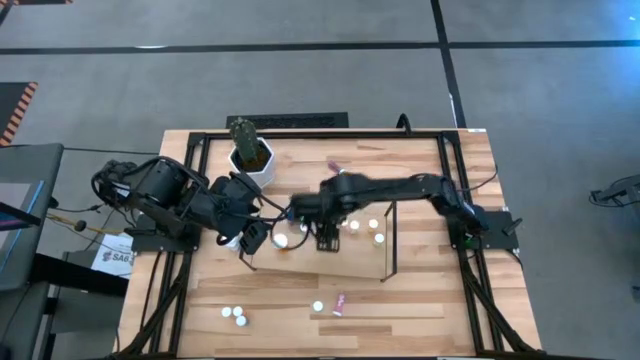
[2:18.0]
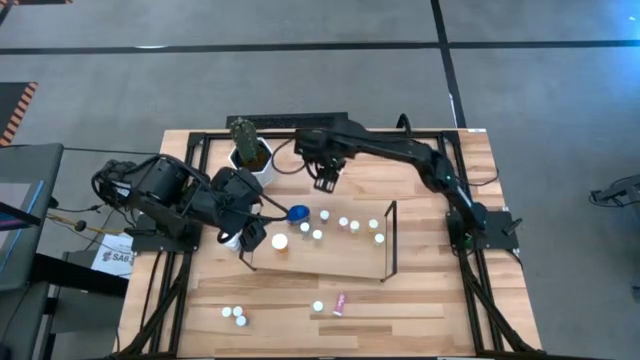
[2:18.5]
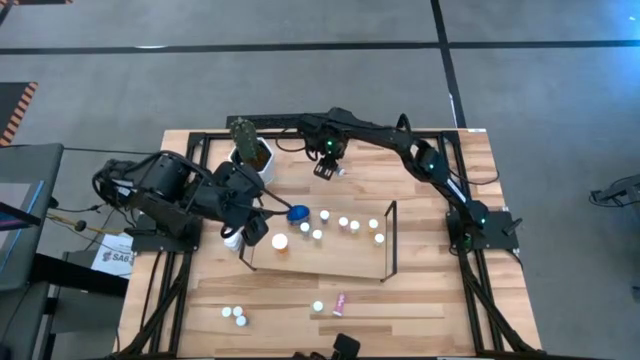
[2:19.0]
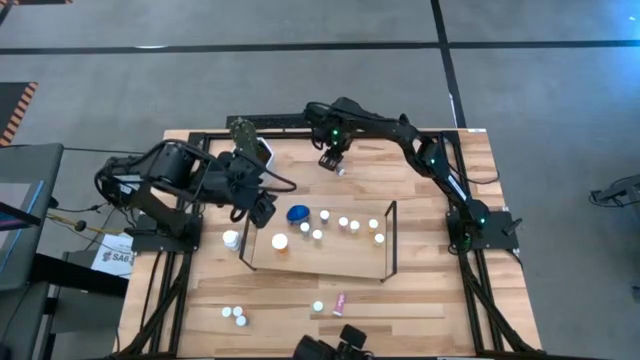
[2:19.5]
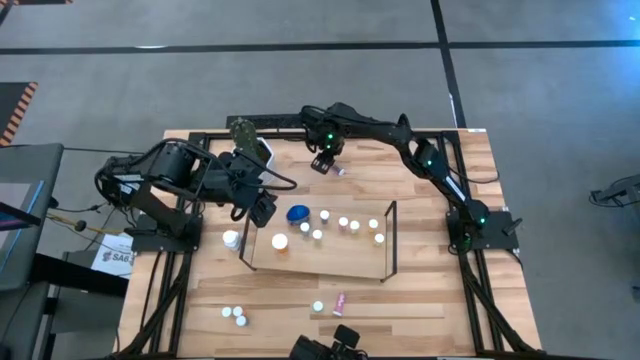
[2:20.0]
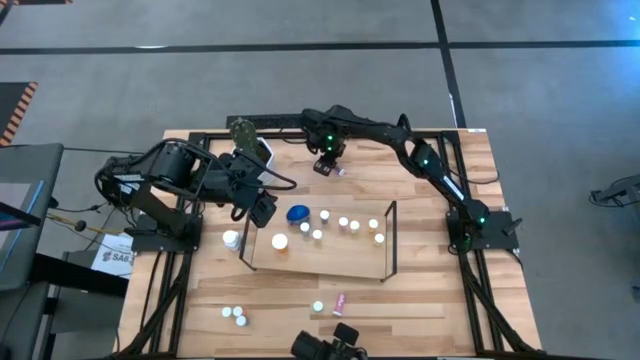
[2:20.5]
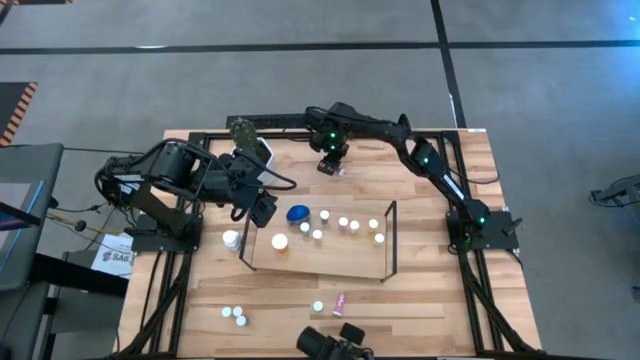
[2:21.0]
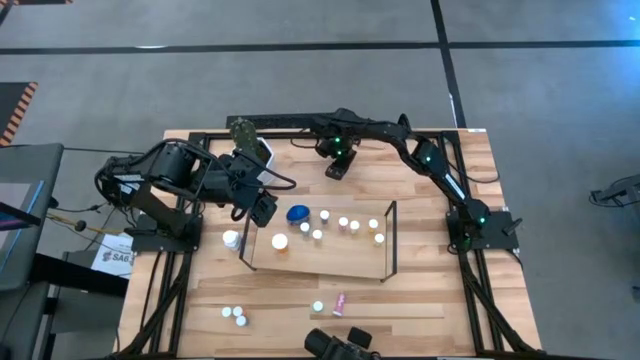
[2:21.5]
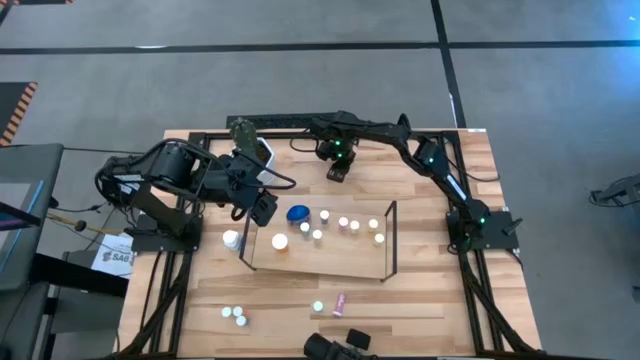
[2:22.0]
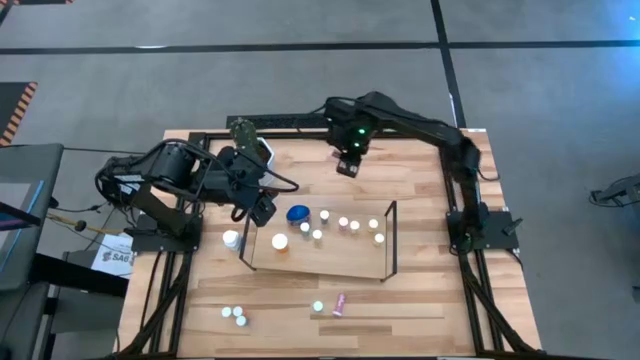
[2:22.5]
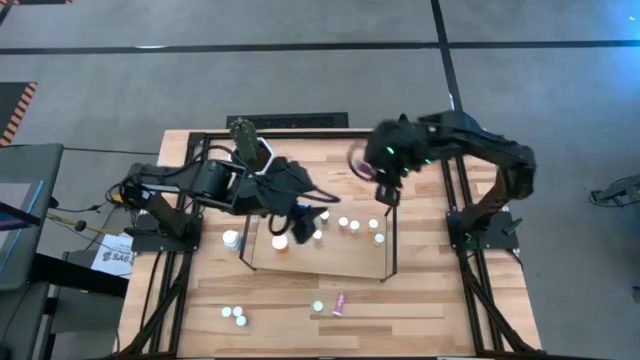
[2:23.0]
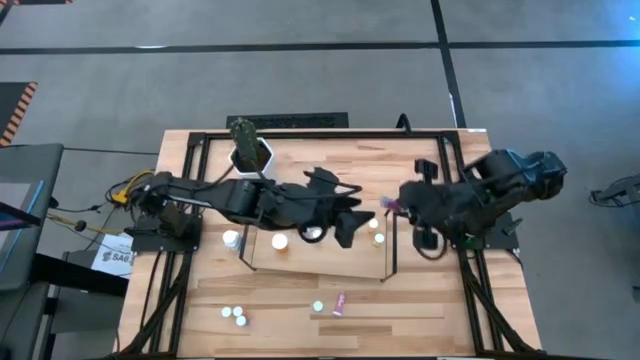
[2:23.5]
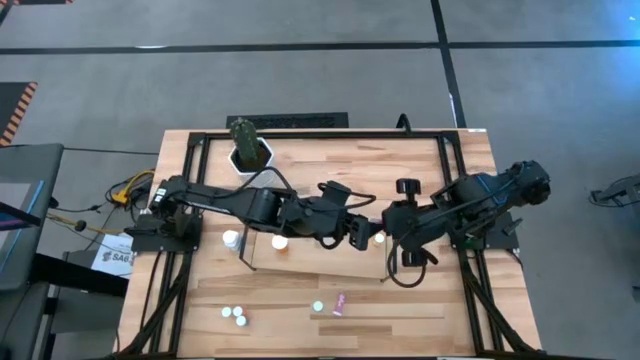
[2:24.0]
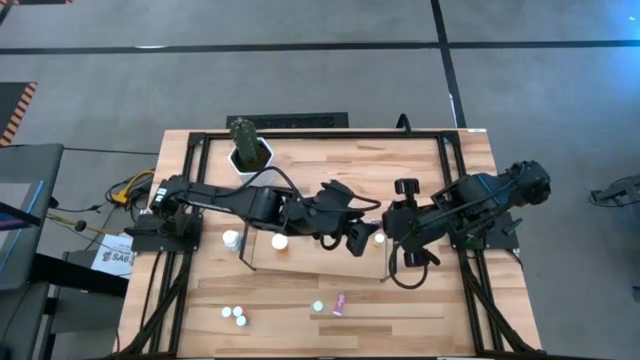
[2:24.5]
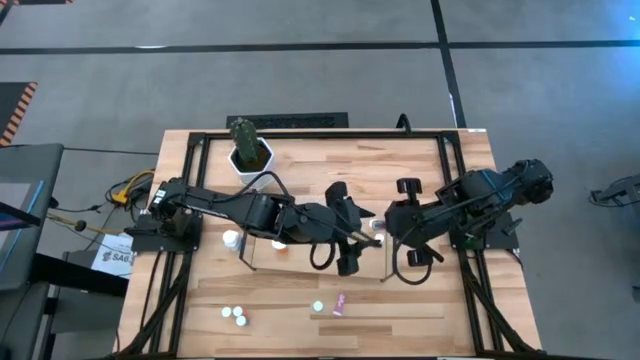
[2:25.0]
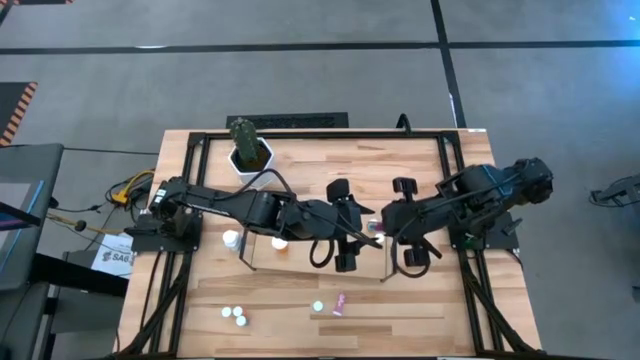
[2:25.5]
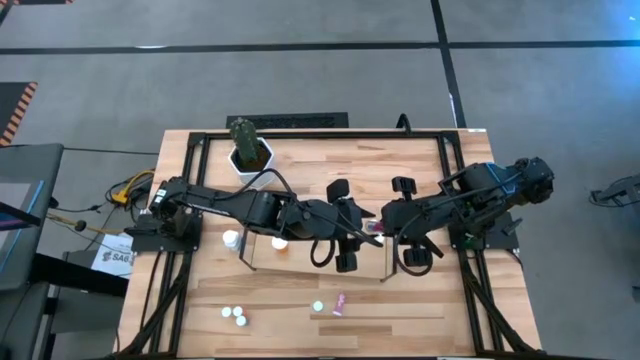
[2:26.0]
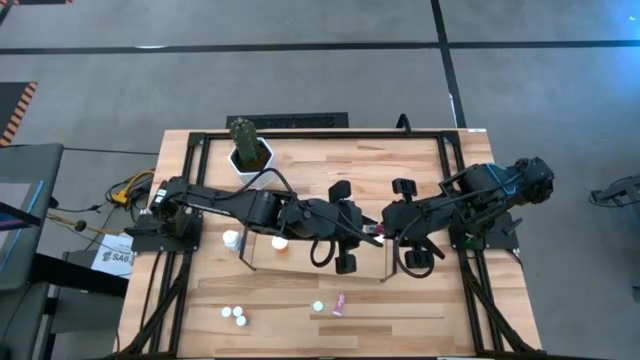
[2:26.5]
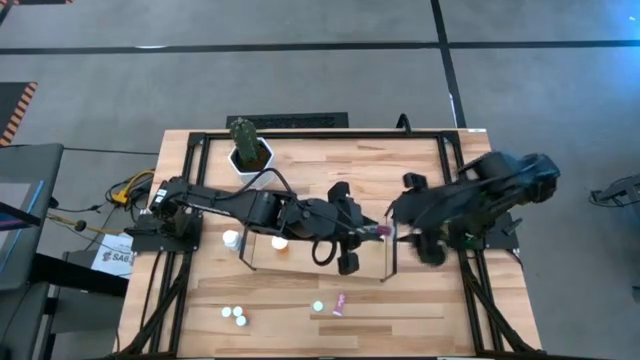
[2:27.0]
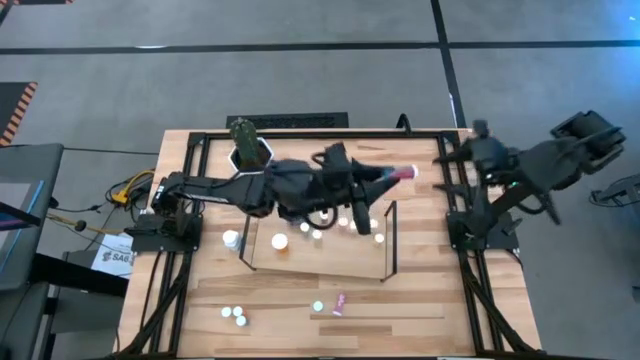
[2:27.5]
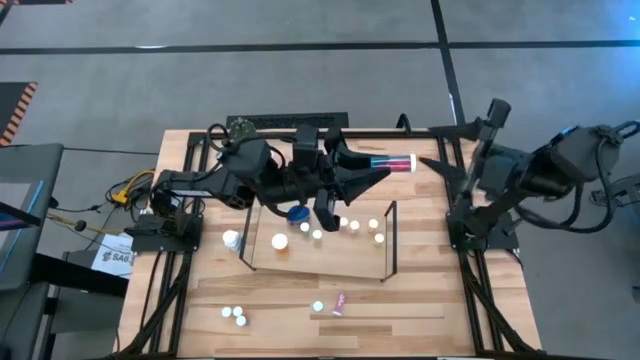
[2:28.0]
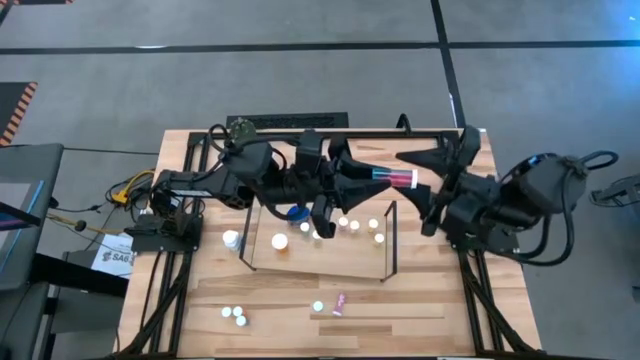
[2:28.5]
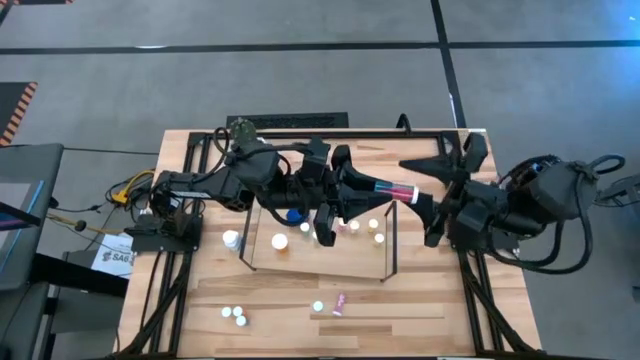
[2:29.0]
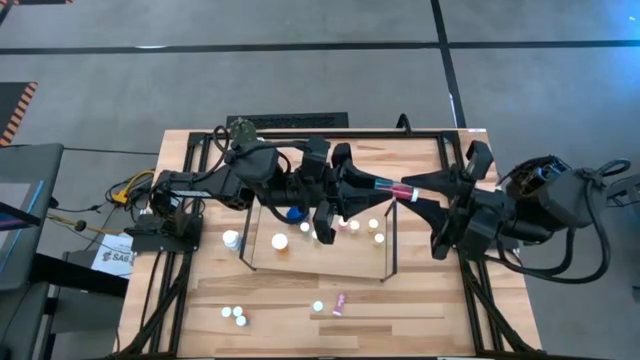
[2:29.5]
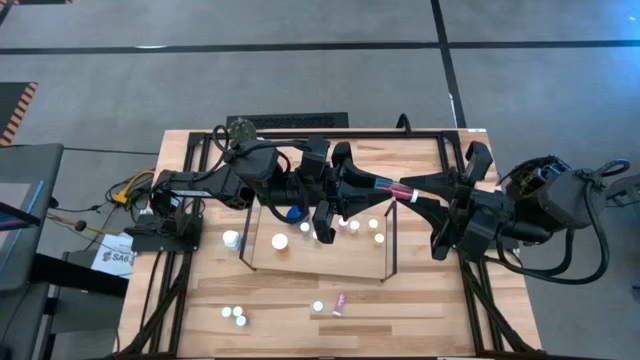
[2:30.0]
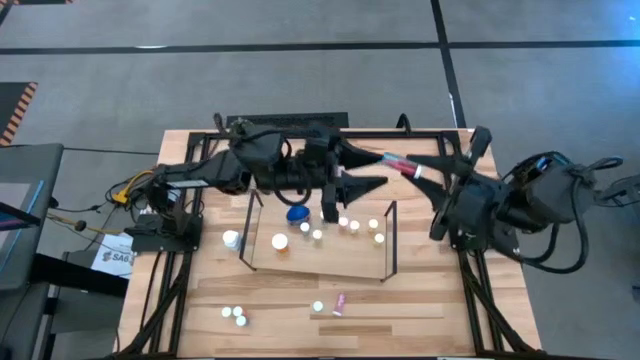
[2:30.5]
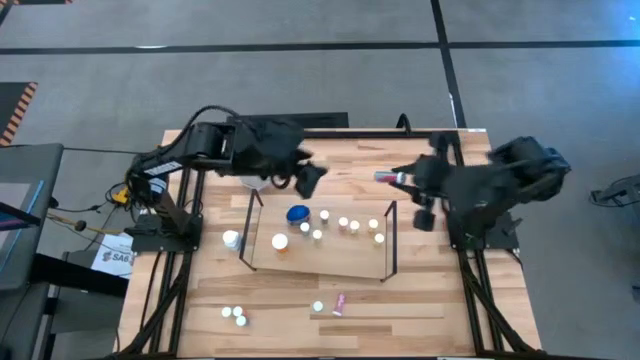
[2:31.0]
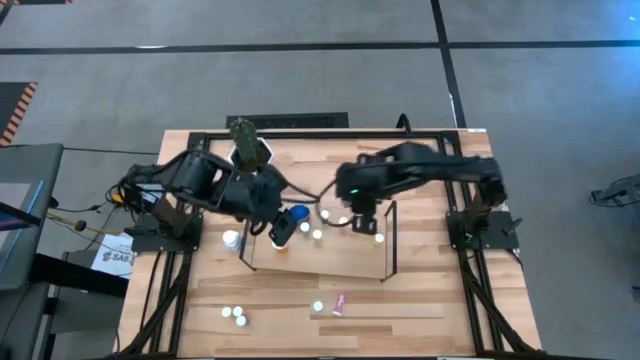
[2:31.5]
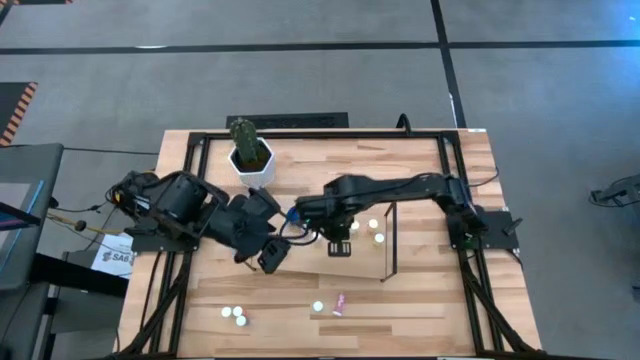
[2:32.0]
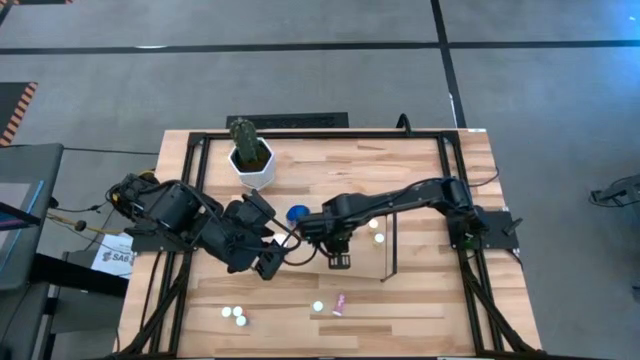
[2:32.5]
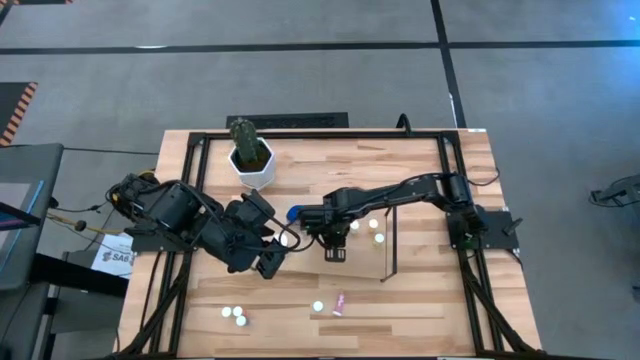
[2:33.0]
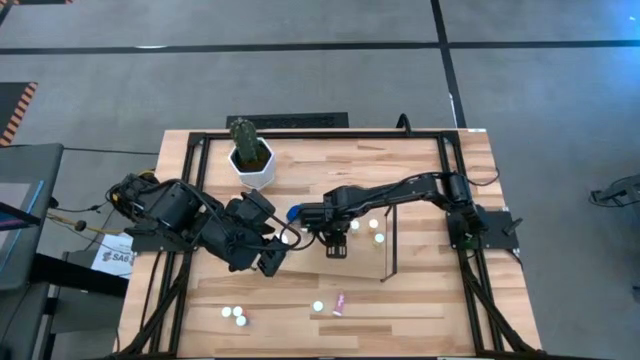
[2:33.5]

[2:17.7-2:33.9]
Task: Pick and place medicine bottles onto shelf by color
Put the blue pill bottle on the shelf

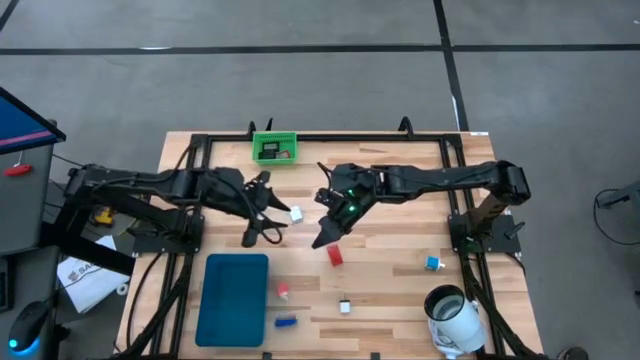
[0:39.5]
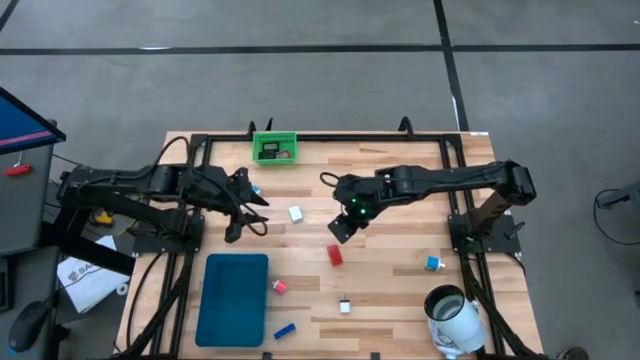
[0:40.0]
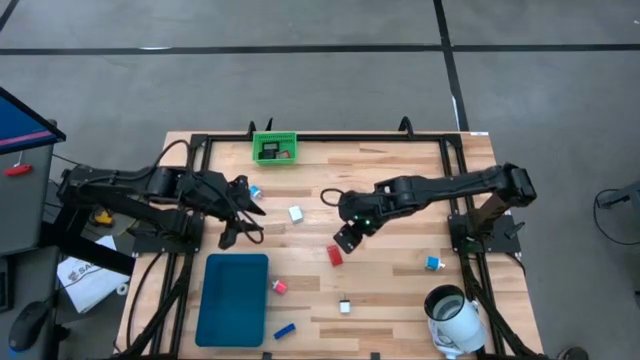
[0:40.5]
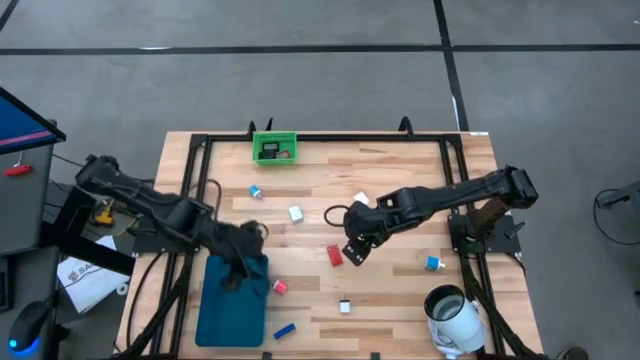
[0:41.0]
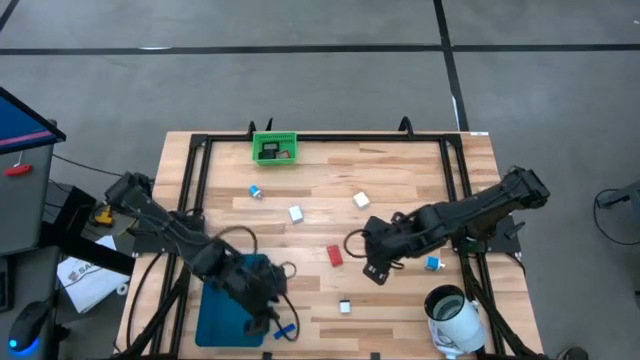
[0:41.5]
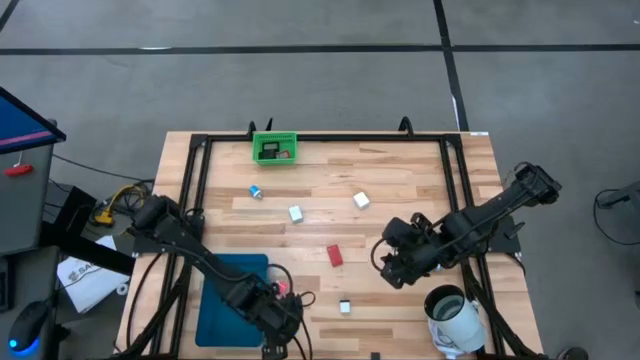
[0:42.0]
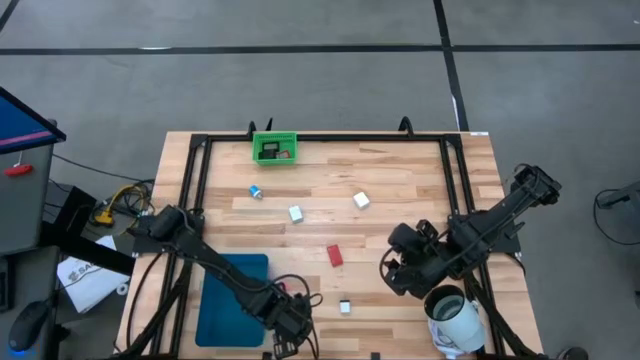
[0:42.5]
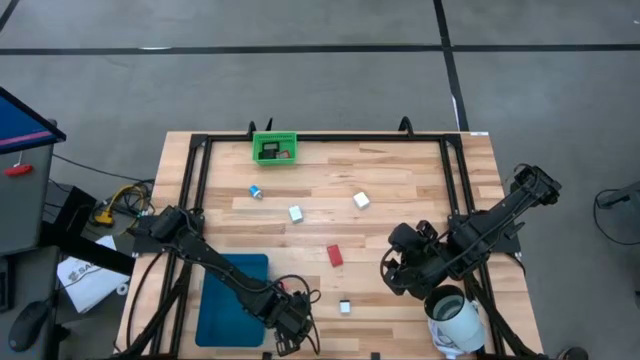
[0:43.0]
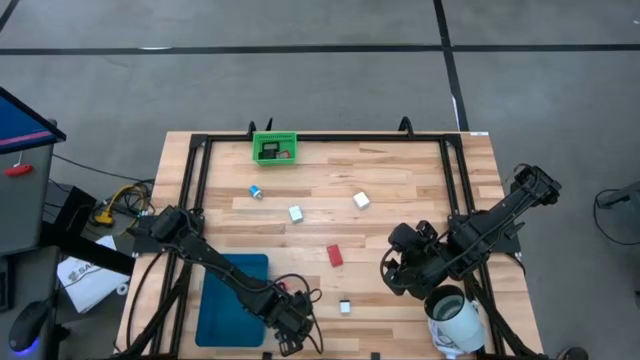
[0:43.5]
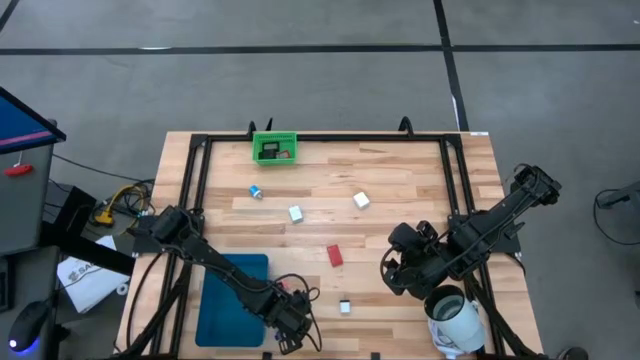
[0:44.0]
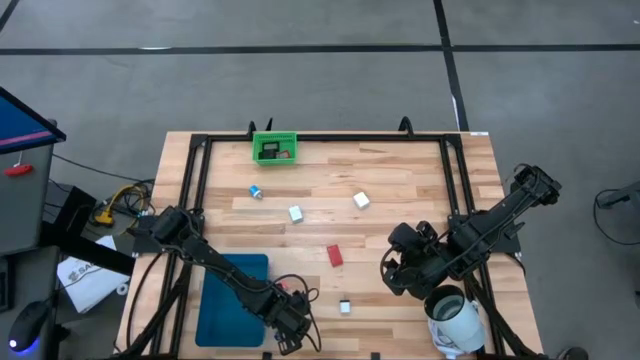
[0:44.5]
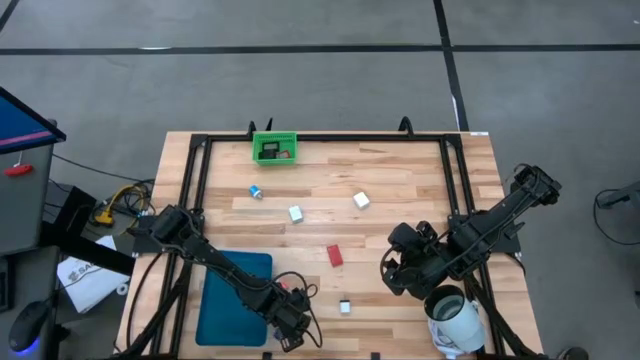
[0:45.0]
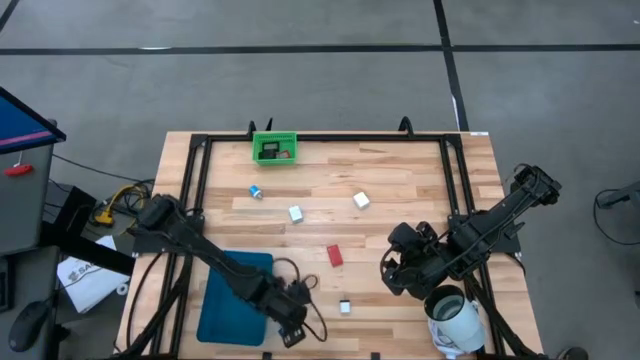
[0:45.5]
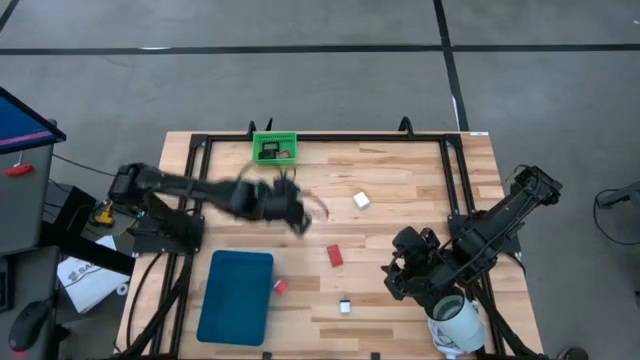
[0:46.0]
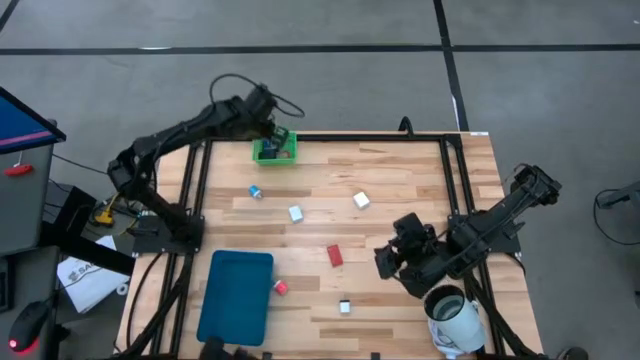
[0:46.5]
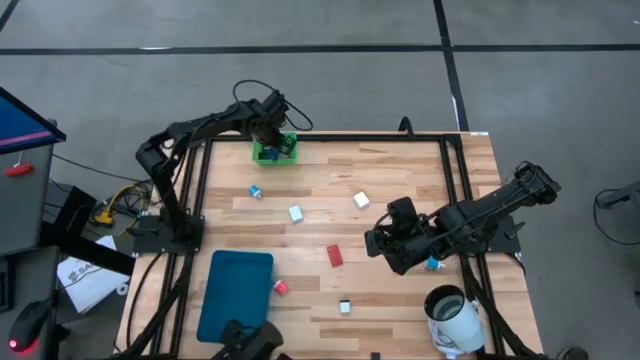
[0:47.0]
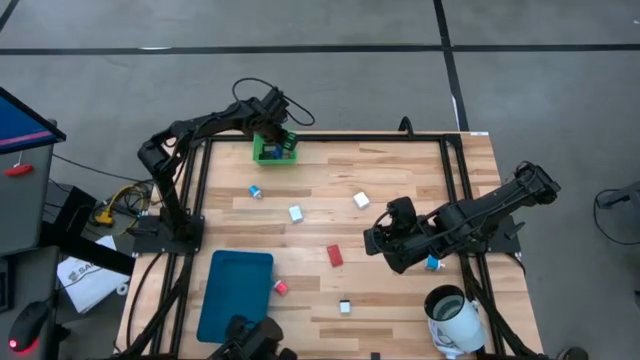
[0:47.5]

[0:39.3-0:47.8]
Task: Pick & Place Office items
Put the blue digital clock into the green bin
